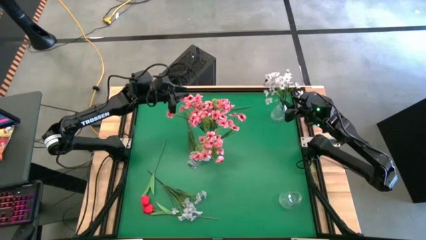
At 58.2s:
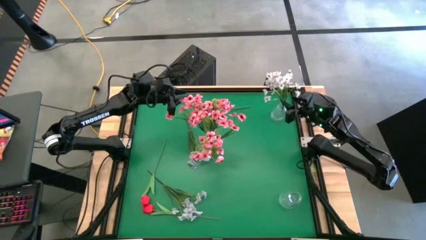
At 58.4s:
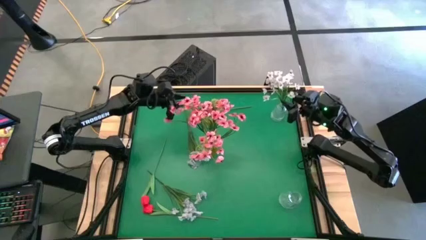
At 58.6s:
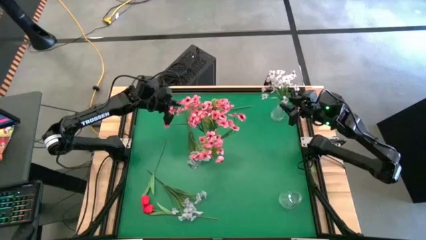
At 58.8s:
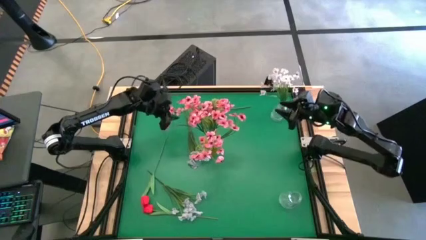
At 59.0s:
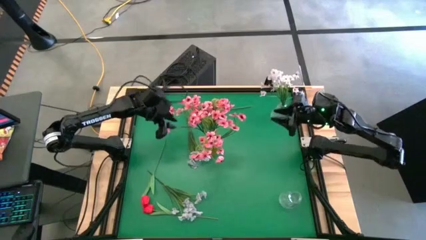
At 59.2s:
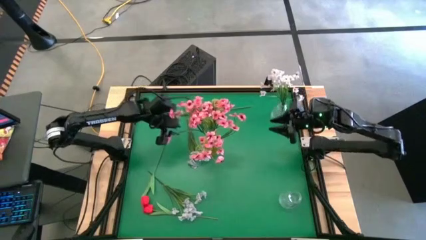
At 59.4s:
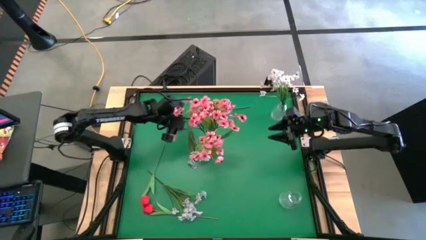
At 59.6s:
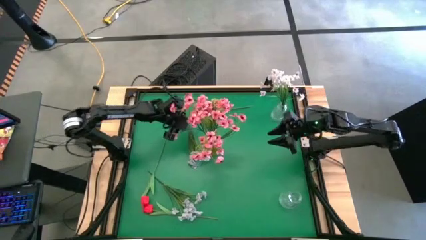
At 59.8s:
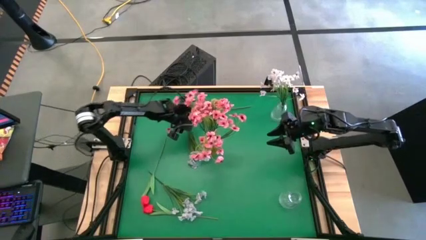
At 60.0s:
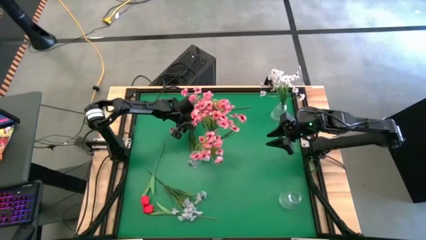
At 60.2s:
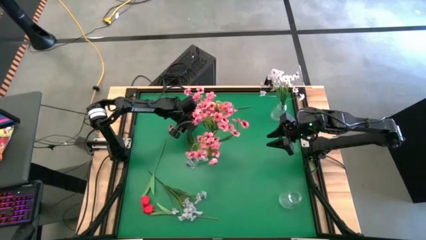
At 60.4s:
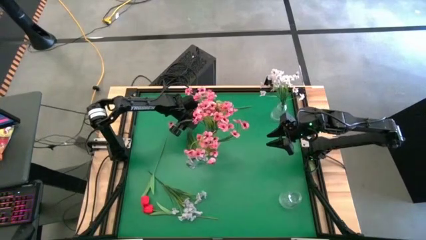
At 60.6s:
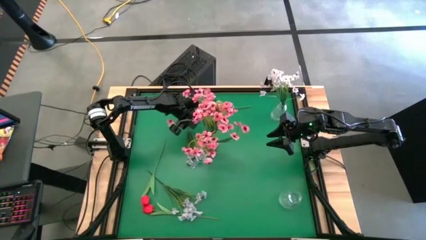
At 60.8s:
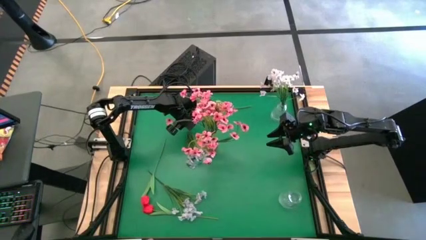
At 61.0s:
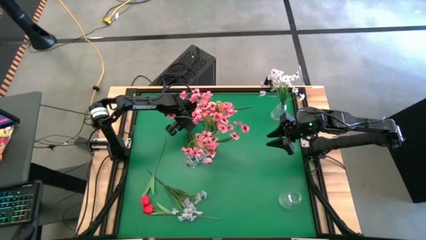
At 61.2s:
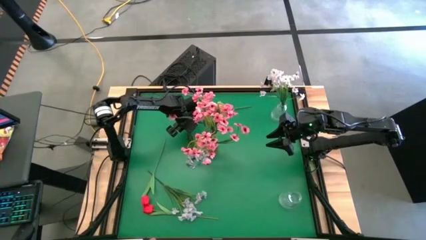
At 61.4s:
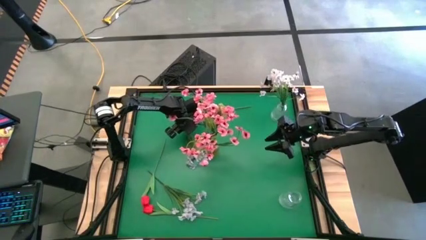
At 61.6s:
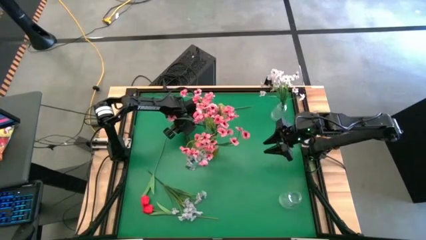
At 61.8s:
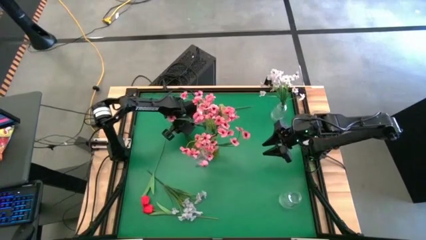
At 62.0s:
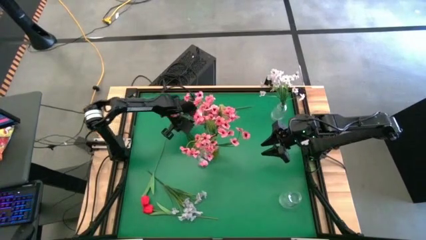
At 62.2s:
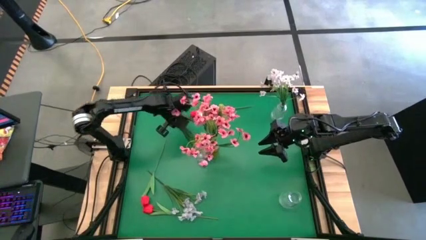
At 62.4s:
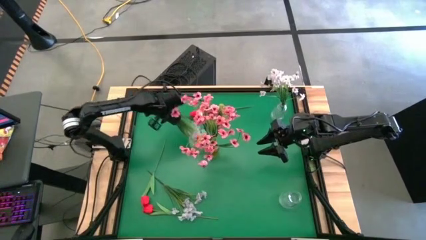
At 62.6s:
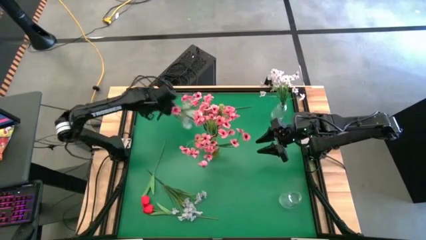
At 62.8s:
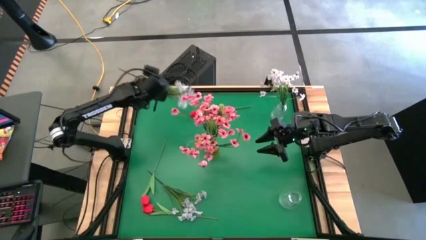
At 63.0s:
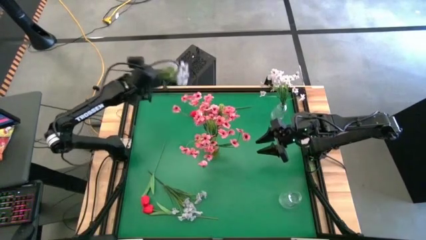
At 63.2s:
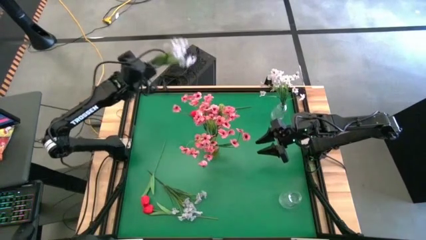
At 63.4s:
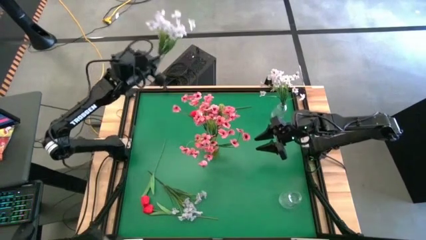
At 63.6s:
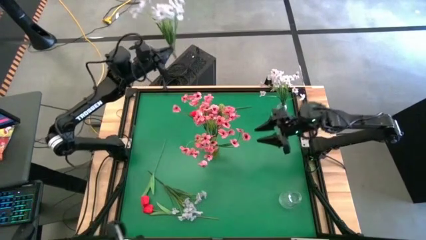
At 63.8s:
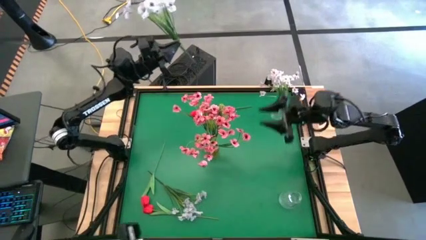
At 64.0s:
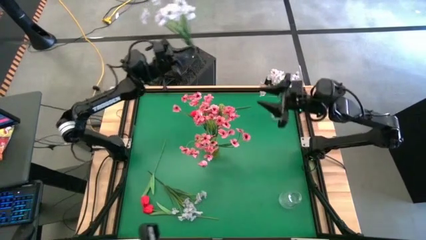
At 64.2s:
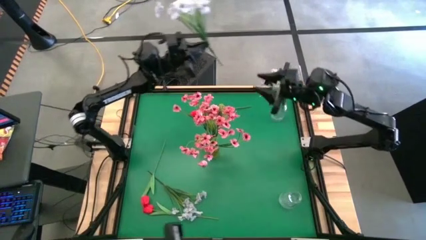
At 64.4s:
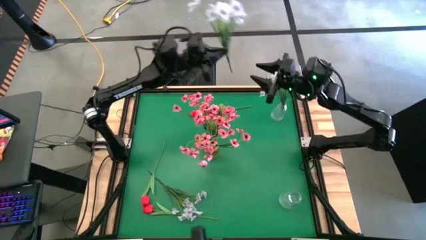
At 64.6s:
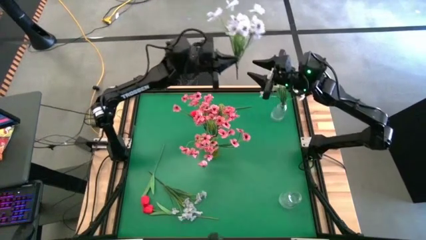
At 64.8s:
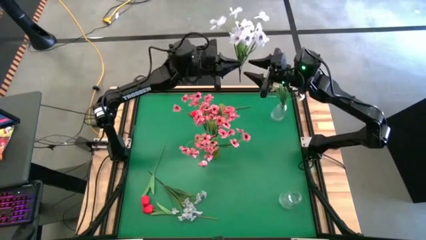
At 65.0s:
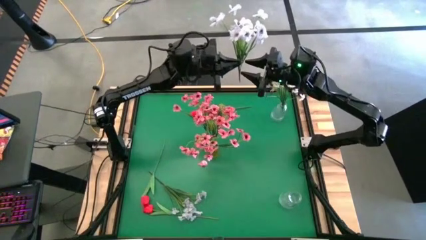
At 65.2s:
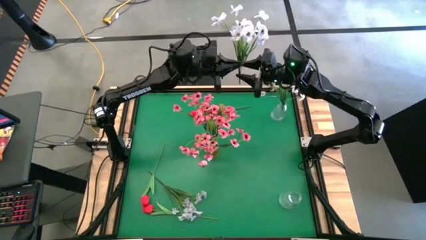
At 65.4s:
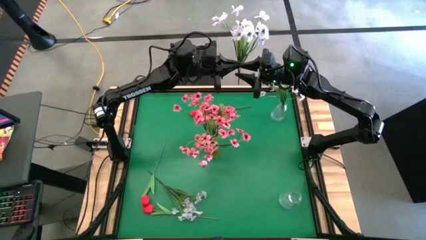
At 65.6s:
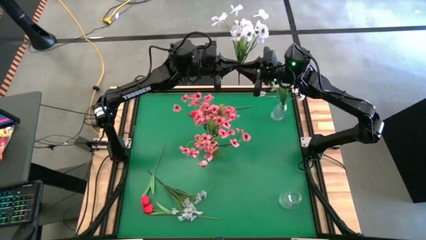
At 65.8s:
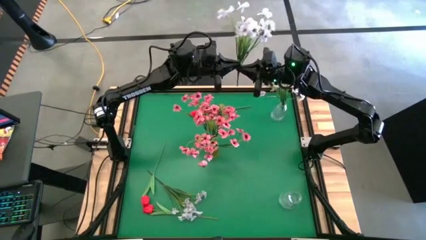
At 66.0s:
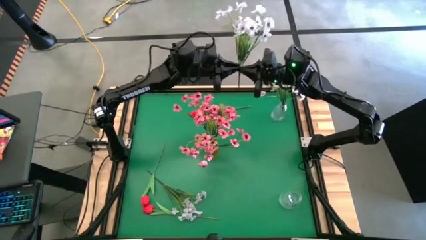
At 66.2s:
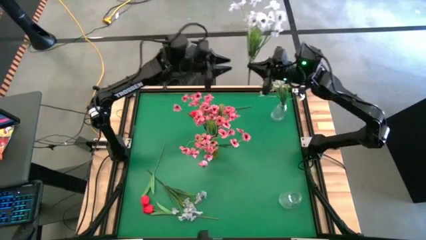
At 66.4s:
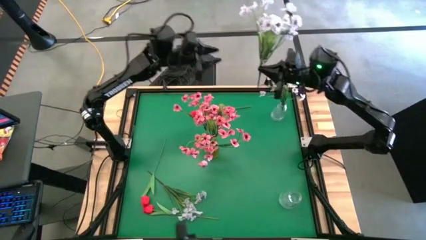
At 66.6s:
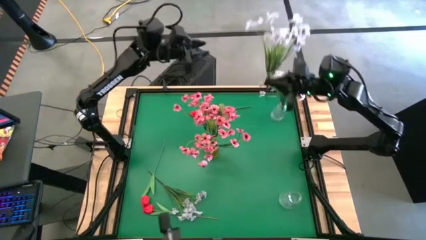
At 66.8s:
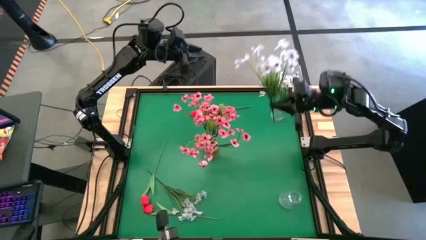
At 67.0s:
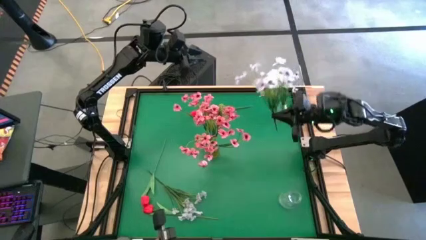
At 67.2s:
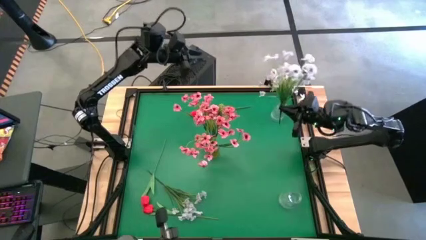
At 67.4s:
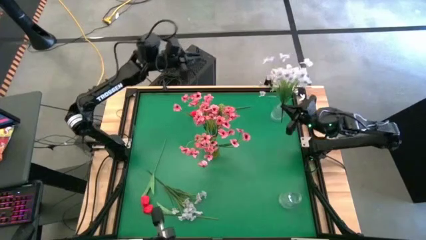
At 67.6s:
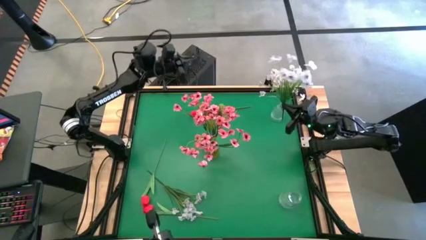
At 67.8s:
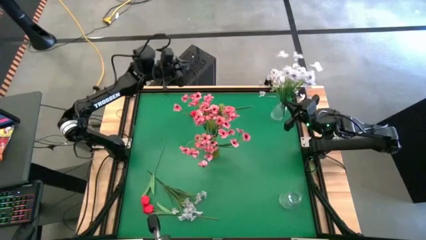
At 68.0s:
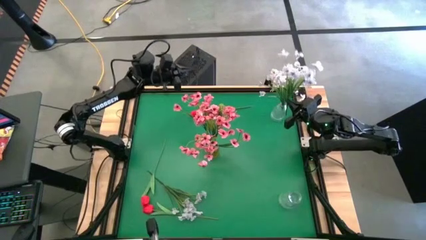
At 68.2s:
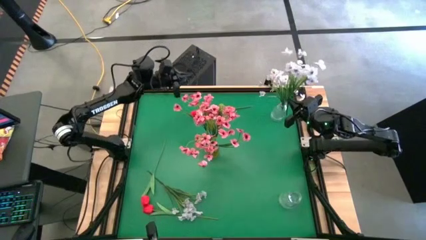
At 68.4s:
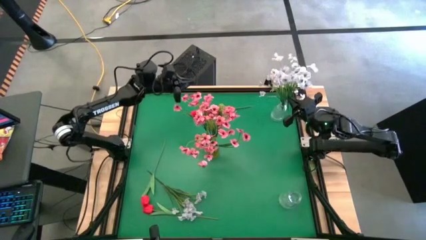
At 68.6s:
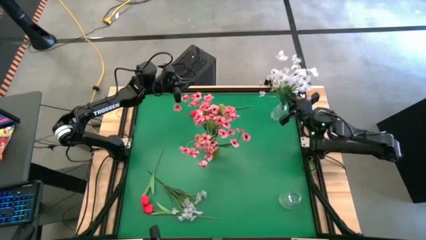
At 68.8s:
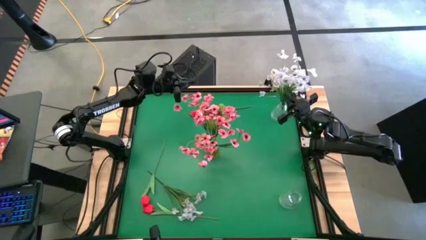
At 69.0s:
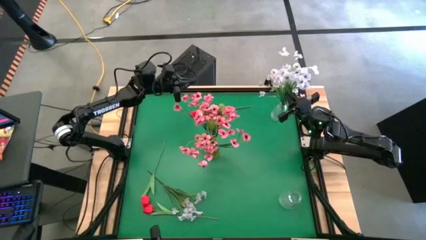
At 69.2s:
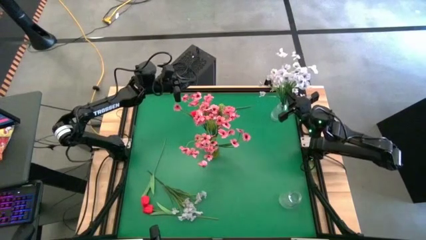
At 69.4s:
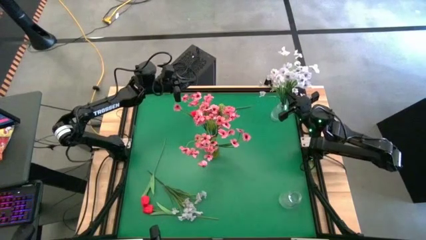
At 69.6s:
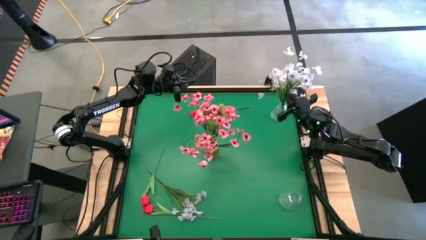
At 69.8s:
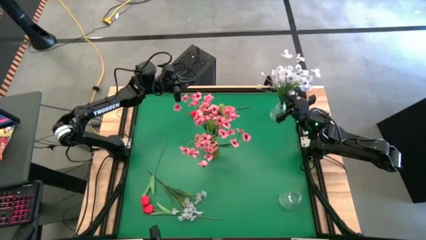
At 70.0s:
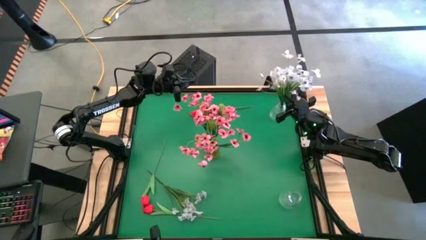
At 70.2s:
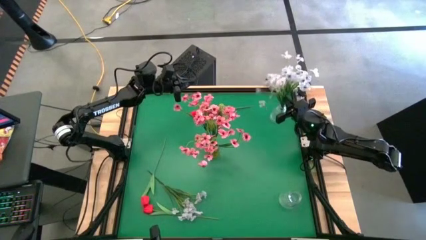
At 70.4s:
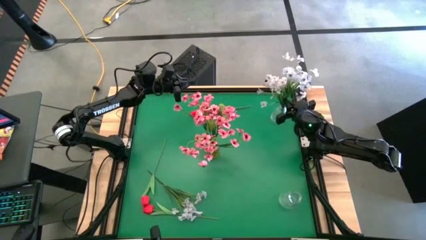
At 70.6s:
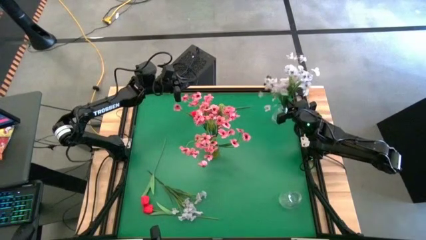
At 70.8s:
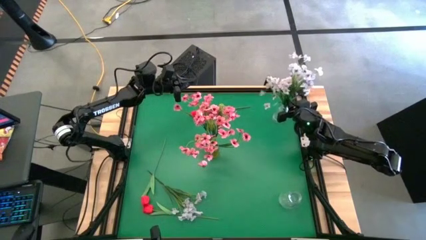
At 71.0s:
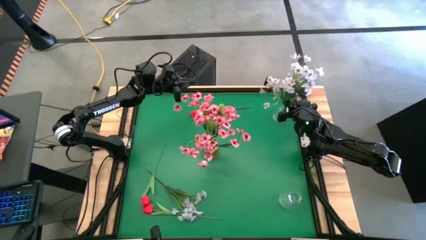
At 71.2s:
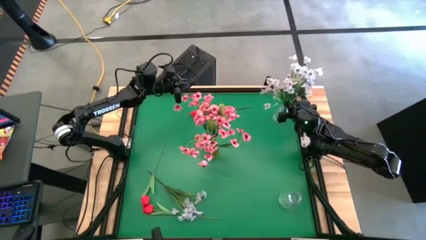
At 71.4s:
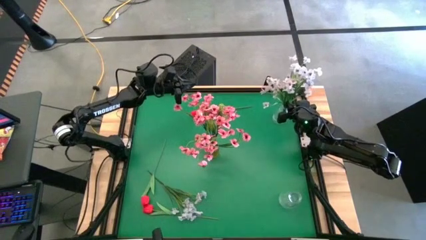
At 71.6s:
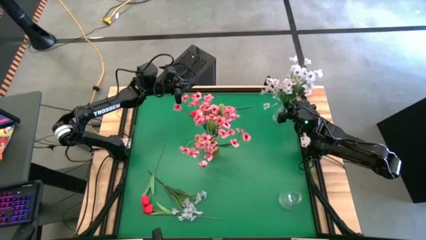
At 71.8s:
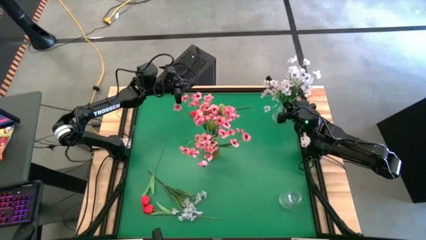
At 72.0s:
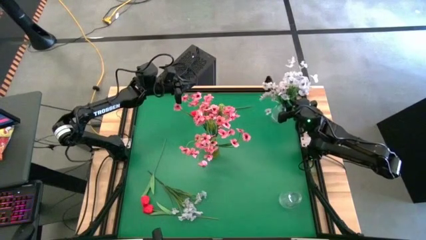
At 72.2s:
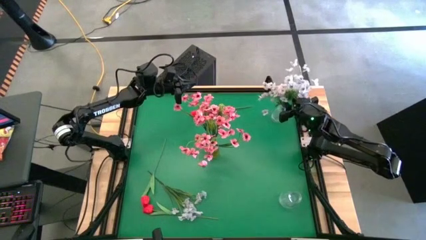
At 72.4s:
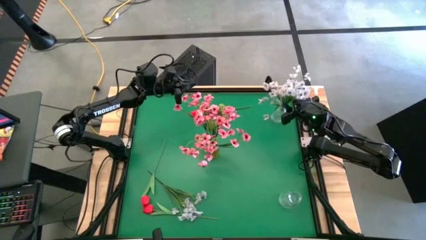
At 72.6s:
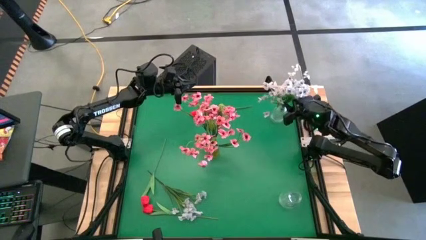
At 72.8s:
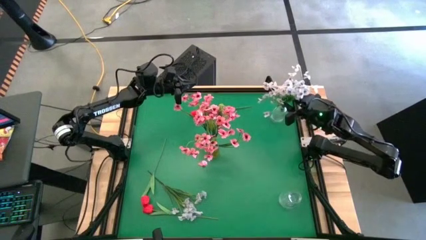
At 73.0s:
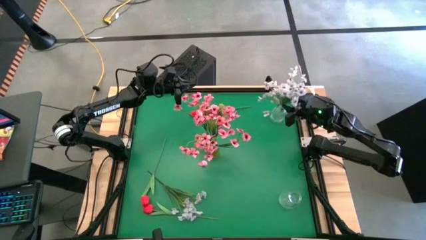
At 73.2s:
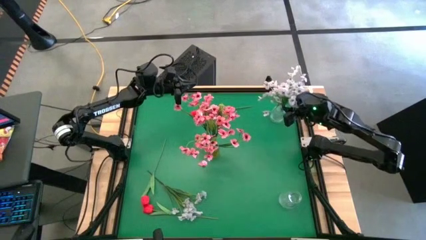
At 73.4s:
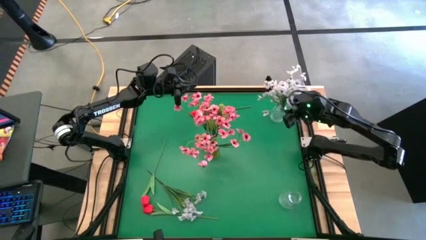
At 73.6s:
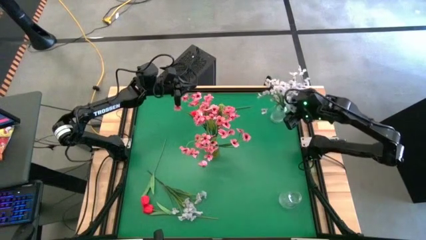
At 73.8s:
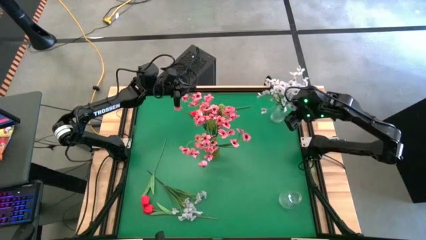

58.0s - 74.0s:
Task: Sort flowers into vase by color
Put the white flowers into the top transparent vase
